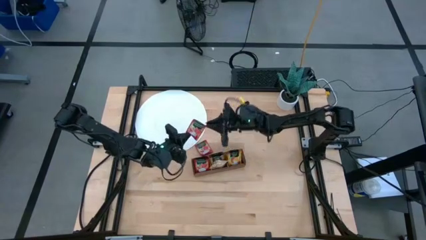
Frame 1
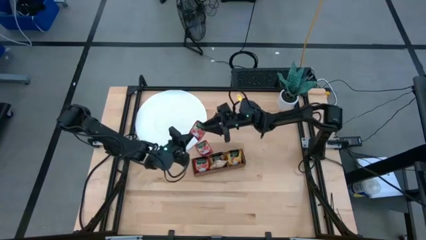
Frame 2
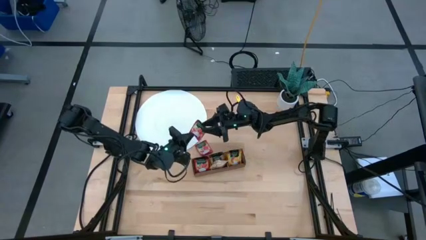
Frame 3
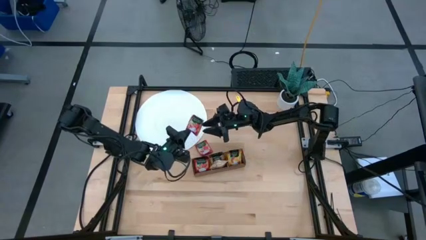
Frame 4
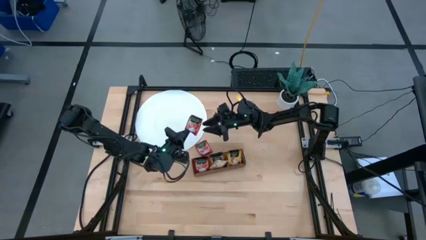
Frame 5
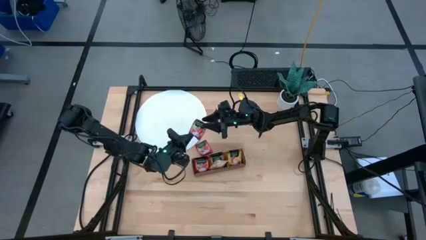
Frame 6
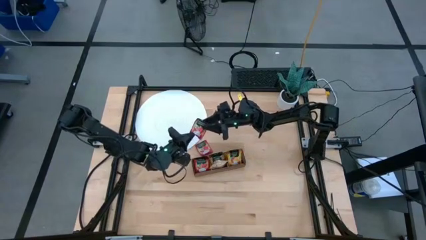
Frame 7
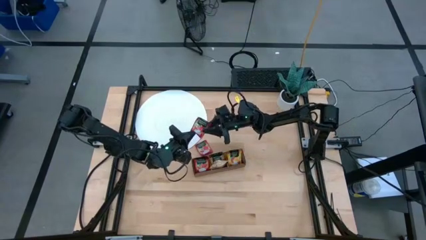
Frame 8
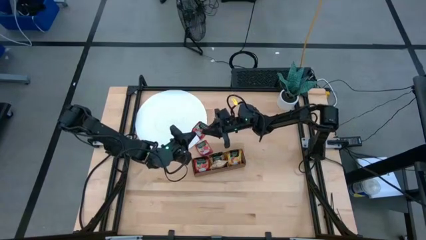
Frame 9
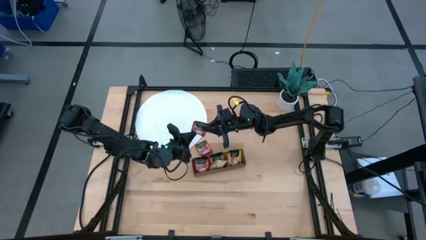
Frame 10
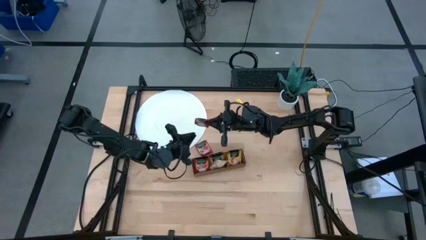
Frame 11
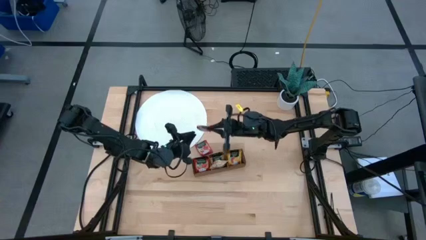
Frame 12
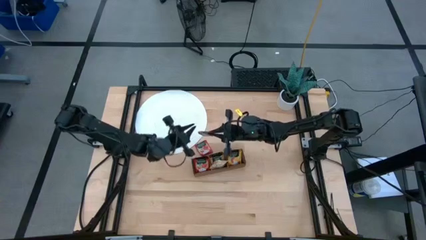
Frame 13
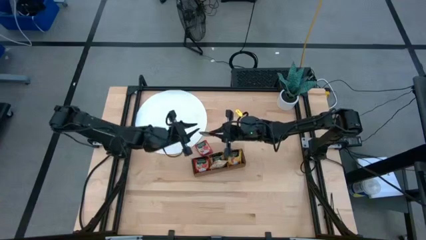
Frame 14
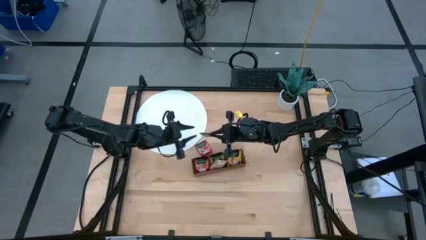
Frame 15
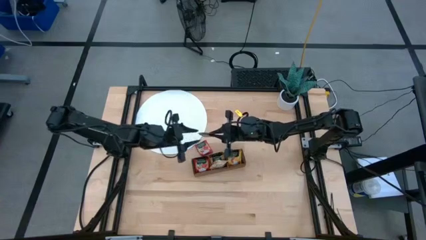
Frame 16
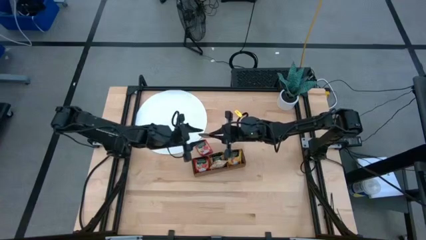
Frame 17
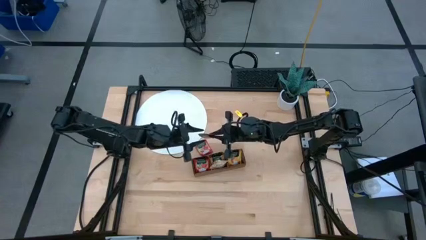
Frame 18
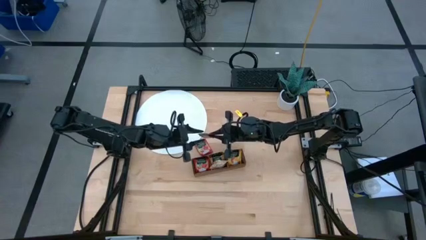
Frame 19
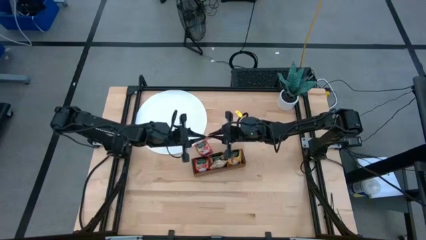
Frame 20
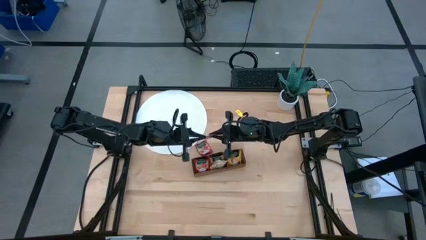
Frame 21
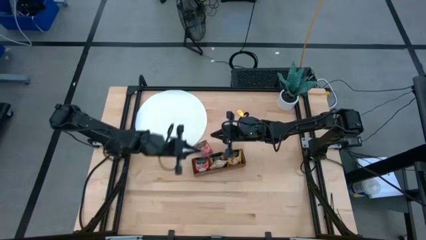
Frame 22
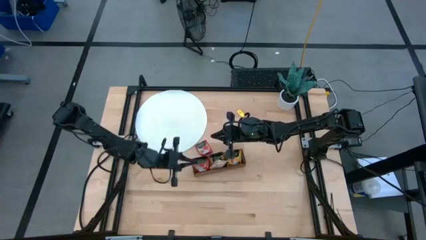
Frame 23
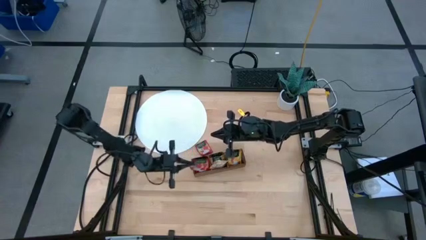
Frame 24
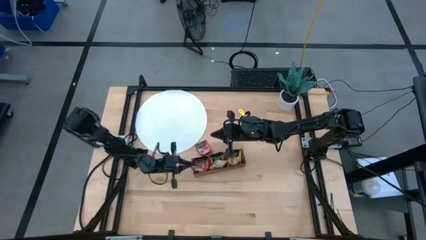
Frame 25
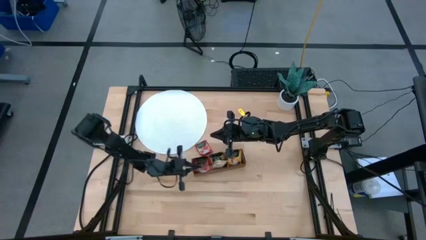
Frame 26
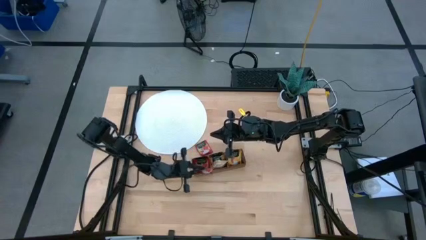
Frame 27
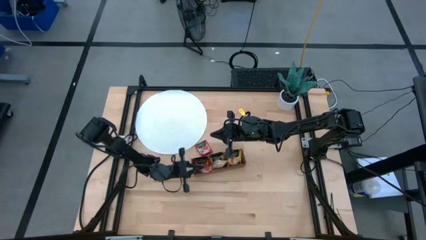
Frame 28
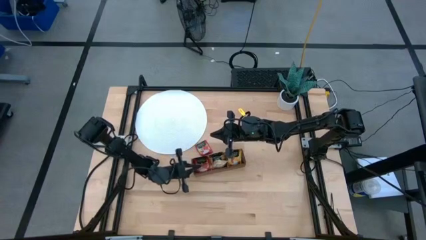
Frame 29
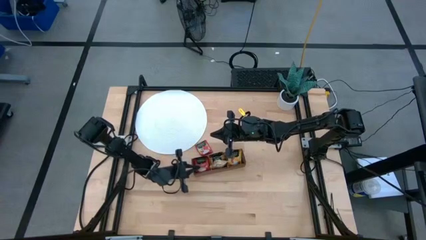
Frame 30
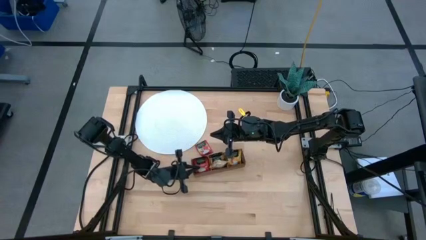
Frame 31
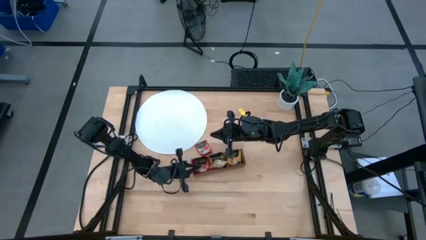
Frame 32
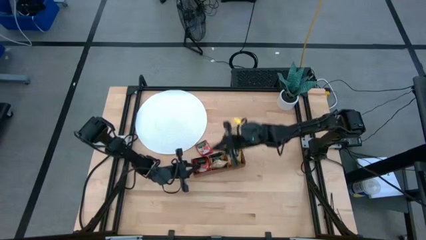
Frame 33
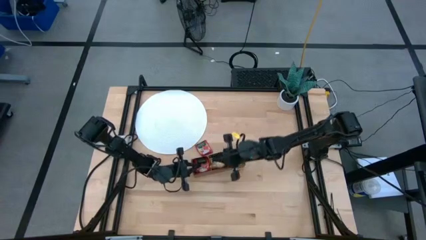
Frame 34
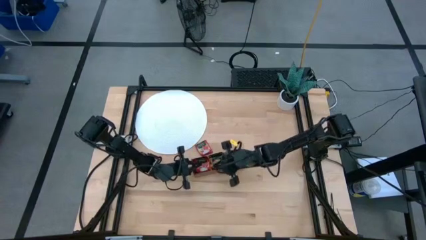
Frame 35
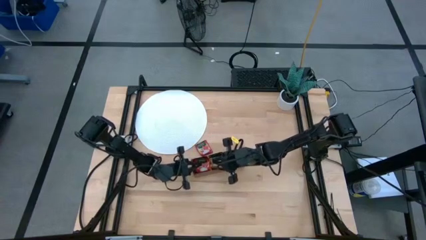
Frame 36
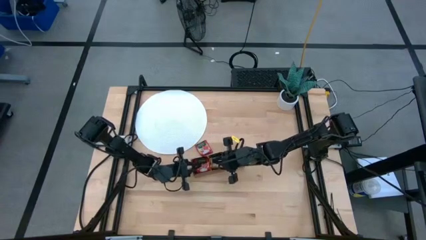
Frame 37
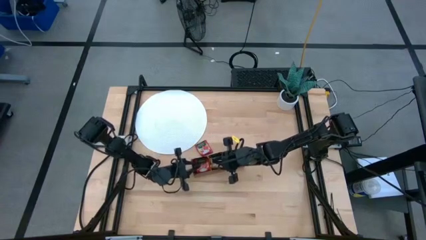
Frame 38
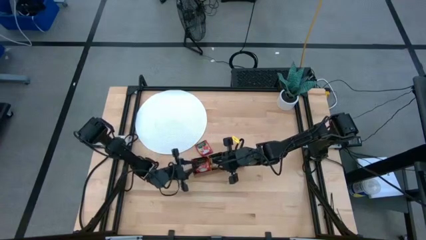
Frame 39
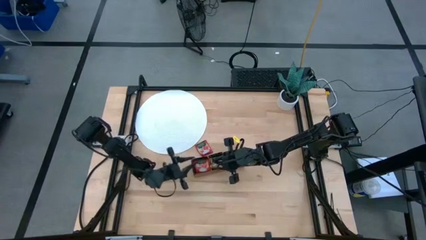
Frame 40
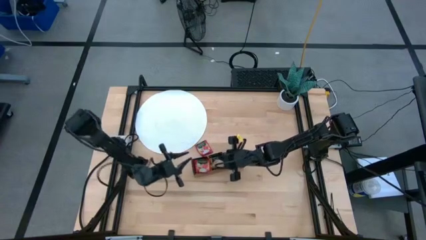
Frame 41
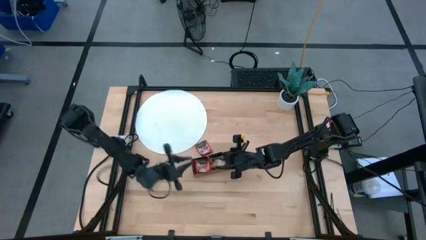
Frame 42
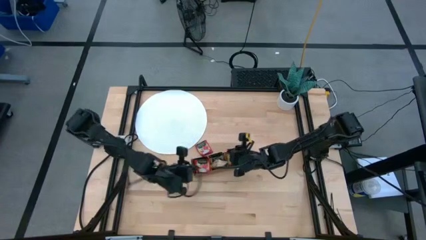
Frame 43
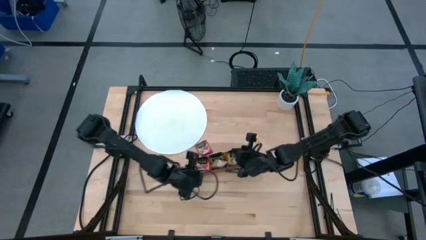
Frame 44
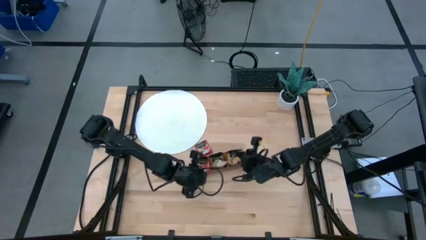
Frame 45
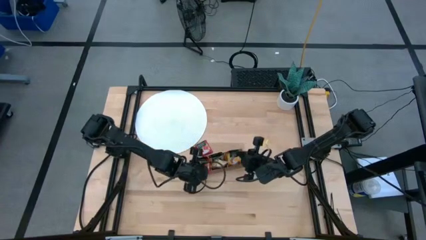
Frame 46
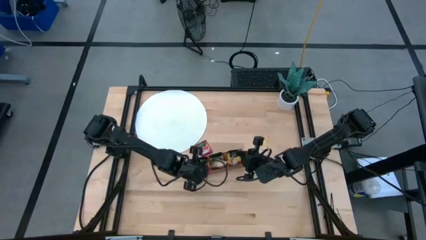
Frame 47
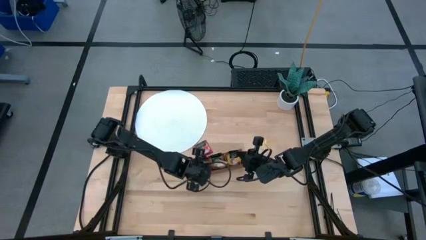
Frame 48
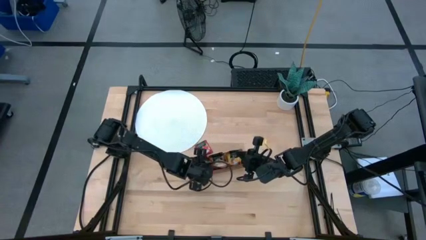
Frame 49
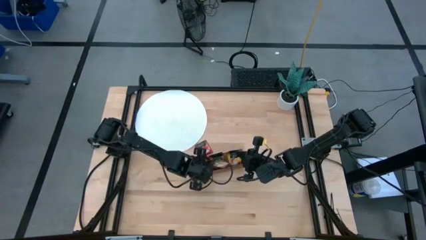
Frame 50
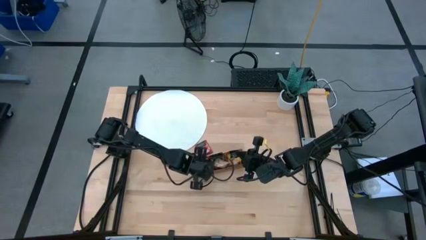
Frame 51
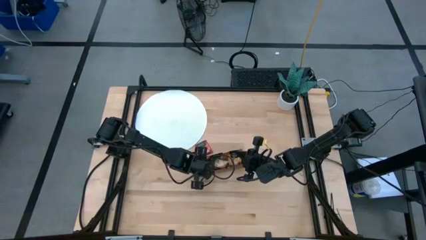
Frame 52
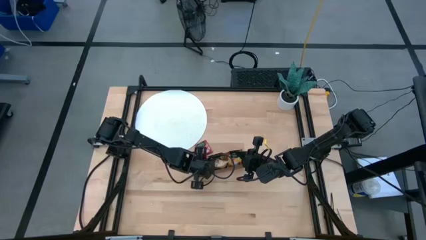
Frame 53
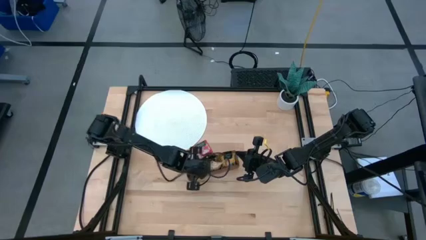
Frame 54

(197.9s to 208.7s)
Task: Pick & Place Tea
Put the left red tea bag into the left section of the wooden organizer

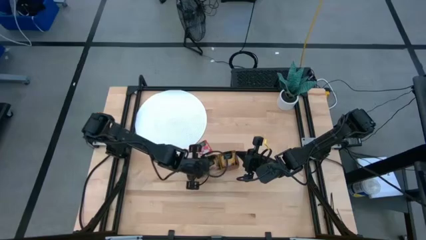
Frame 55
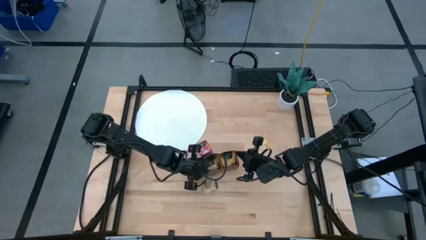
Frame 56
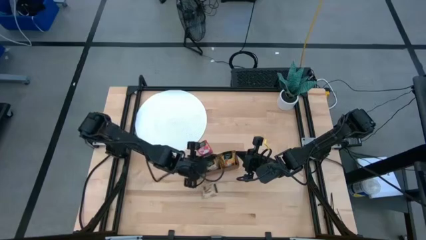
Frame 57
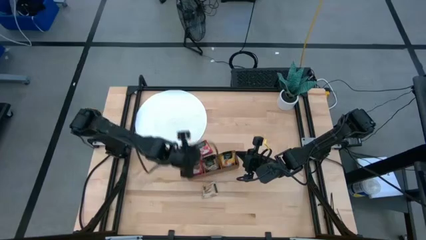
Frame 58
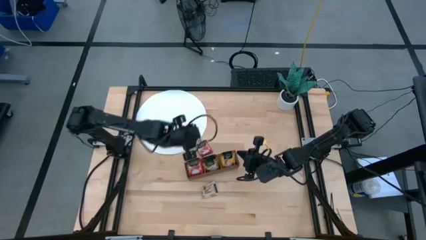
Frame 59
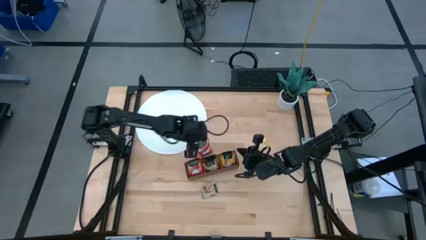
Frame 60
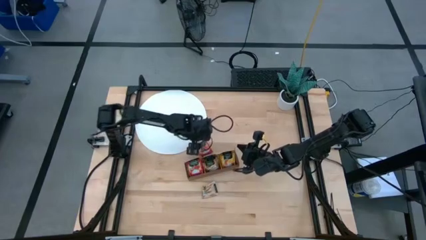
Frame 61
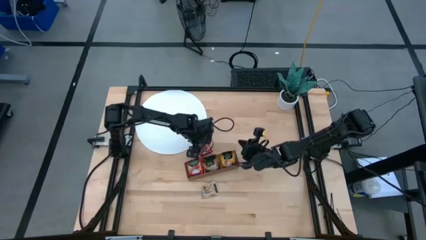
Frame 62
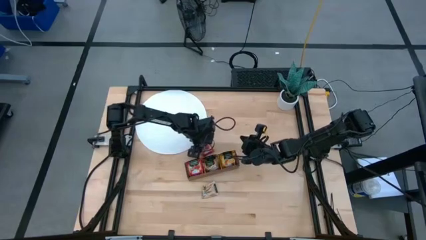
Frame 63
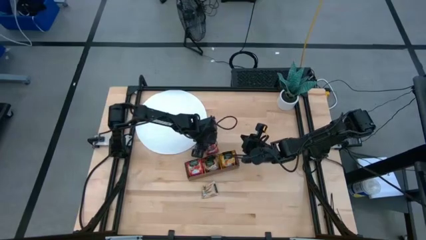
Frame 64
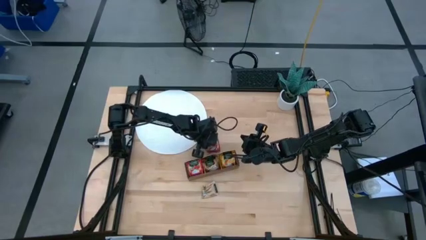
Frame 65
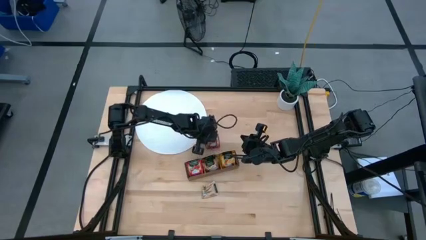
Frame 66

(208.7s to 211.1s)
Put the red tea bag into the left section of the wooden organizer

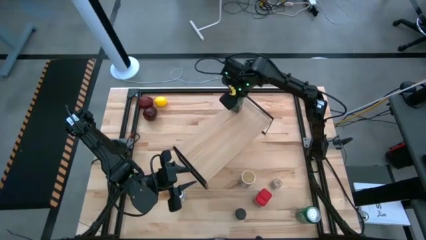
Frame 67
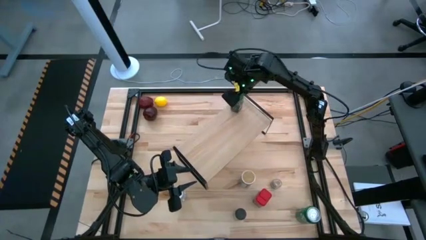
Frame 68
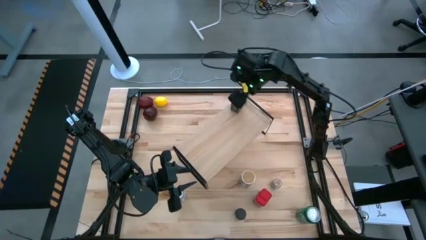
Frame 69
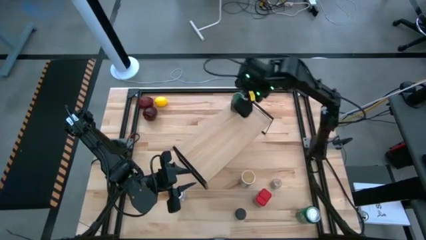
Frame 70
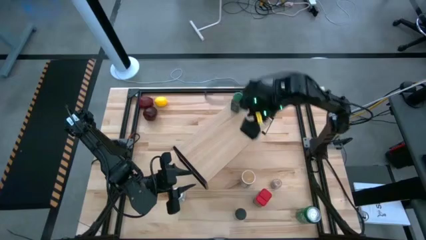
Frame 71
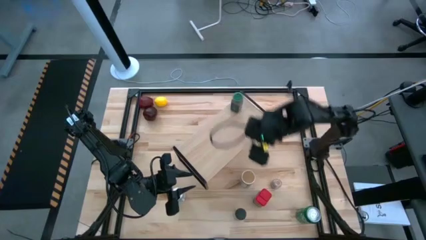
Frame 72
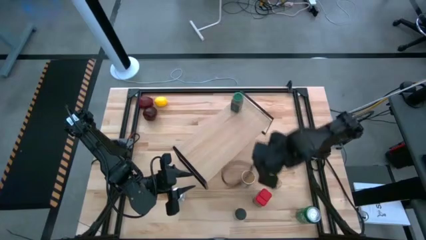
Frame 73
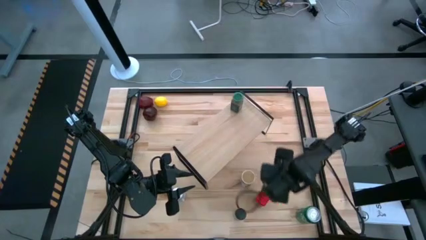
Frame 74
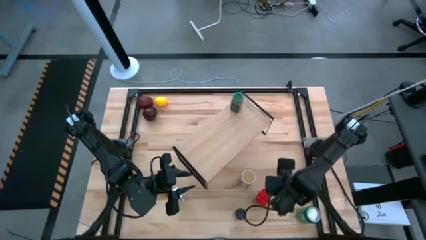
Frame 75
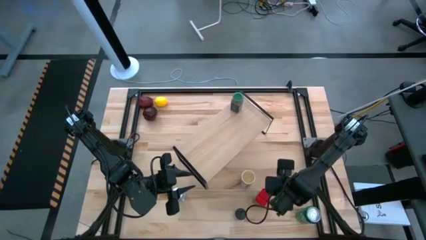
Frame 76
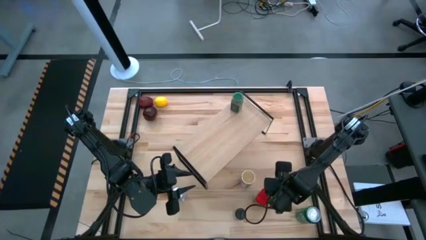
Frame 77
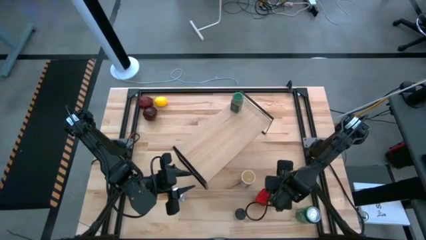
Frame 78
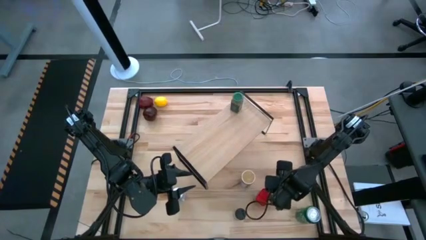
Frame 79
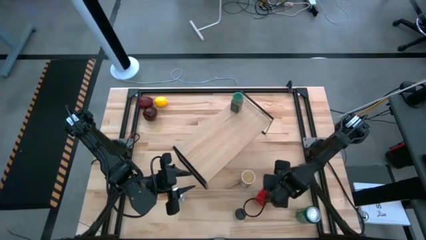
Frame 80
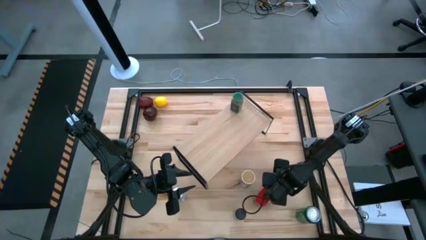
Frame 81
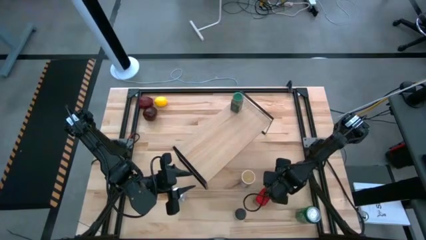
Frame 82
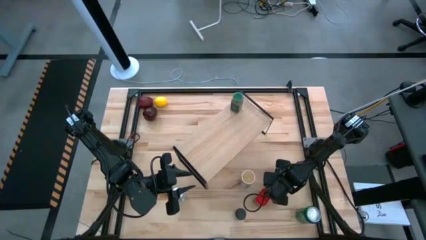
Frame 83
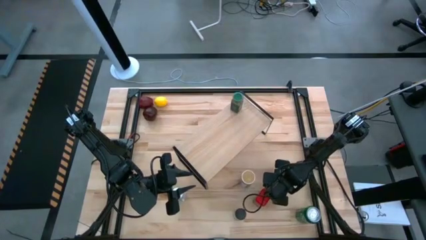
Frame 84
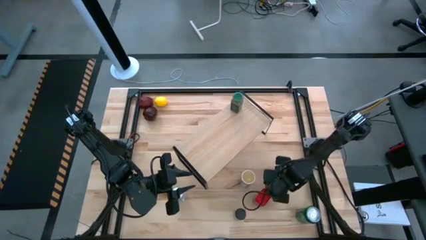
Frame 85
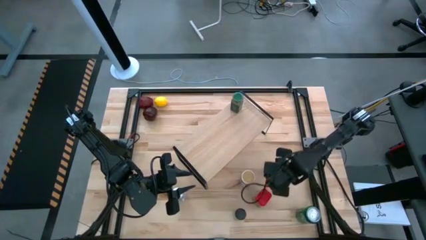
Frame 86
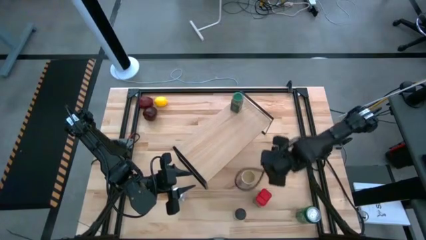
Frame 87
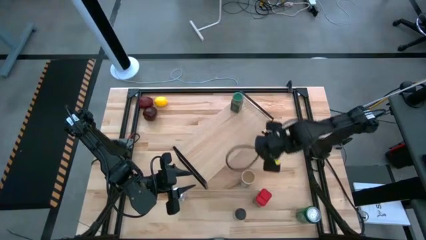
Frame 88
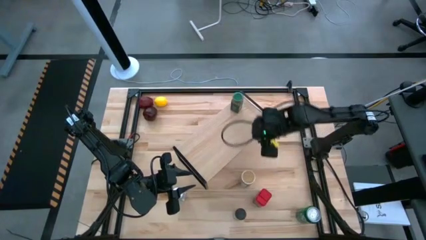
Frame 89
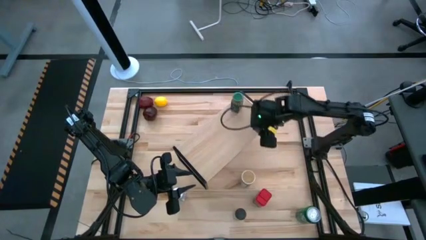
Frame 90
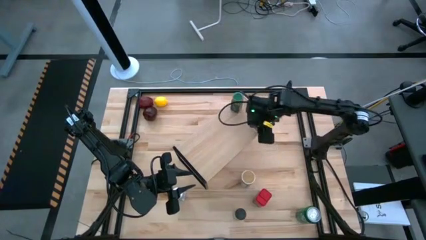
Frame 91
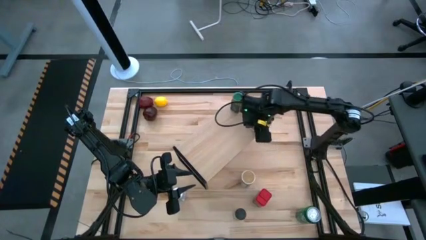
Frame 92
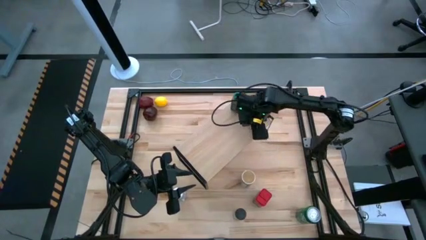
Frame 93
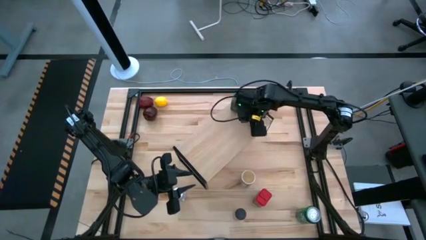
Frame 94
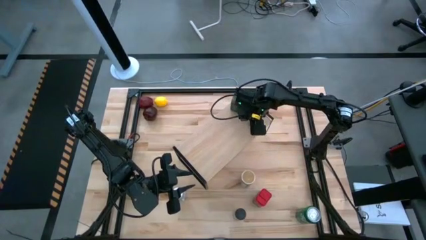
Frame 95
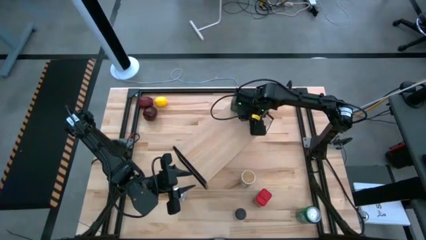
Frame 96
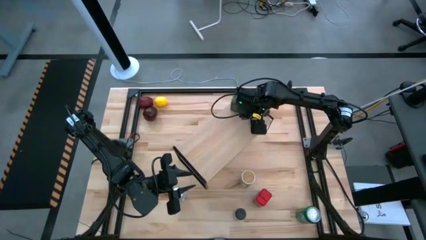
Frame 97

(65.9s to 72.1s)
Task: Shelf spices
Put the brown seasoning bottle on the shelf
